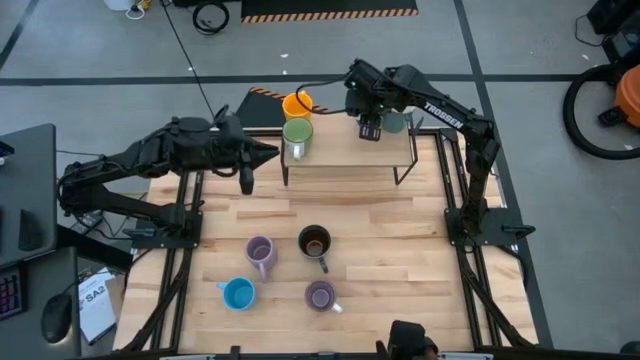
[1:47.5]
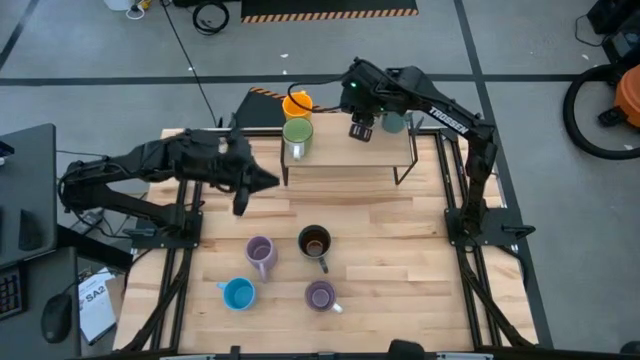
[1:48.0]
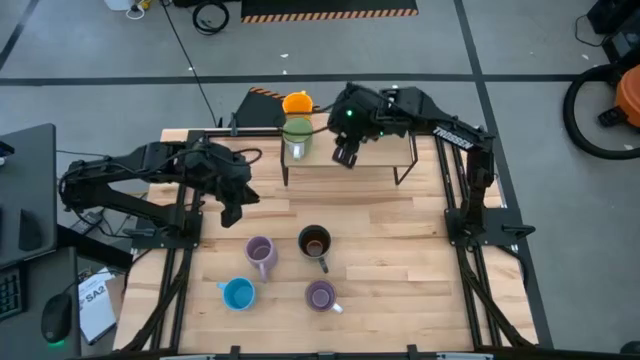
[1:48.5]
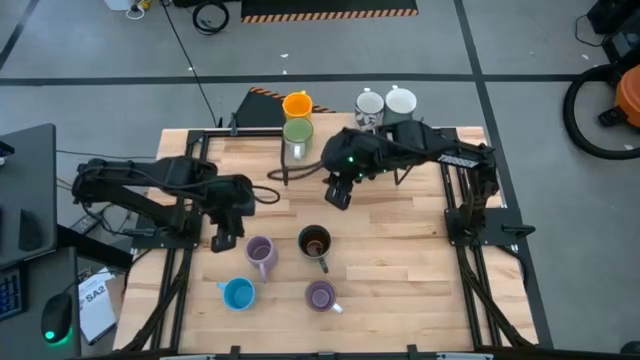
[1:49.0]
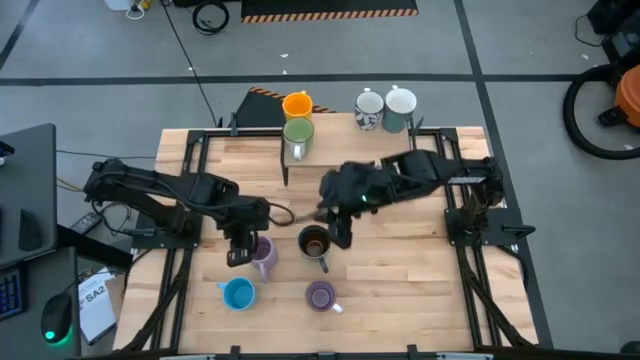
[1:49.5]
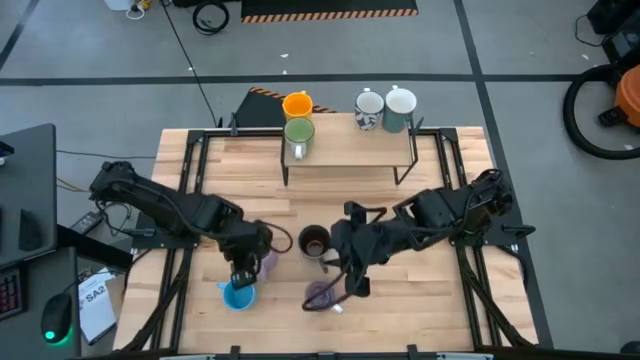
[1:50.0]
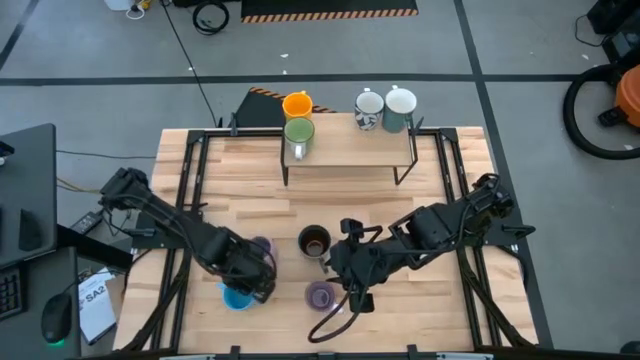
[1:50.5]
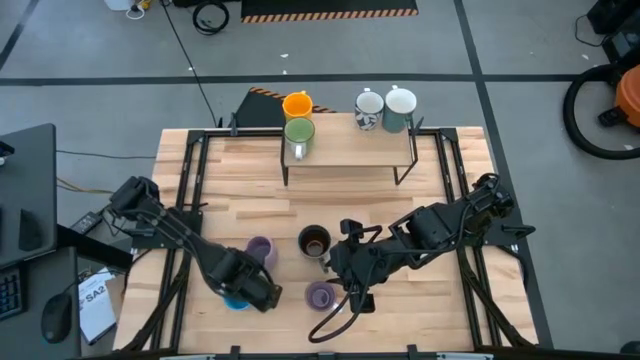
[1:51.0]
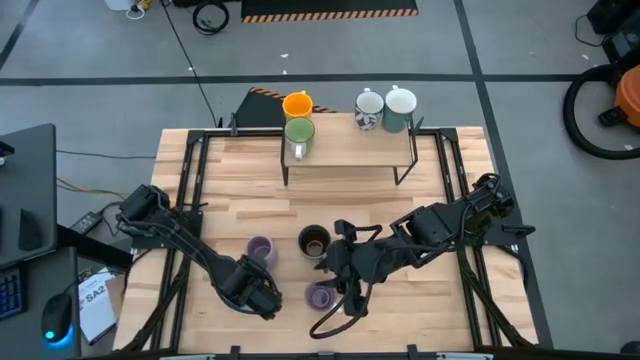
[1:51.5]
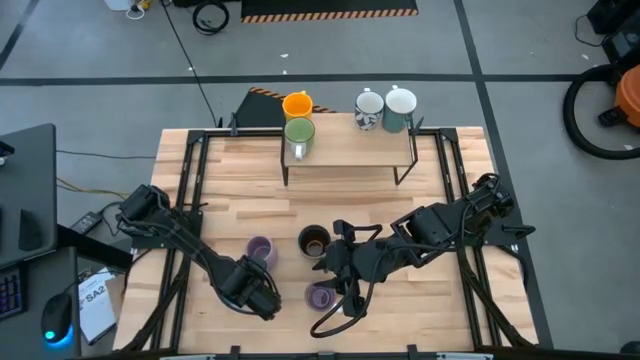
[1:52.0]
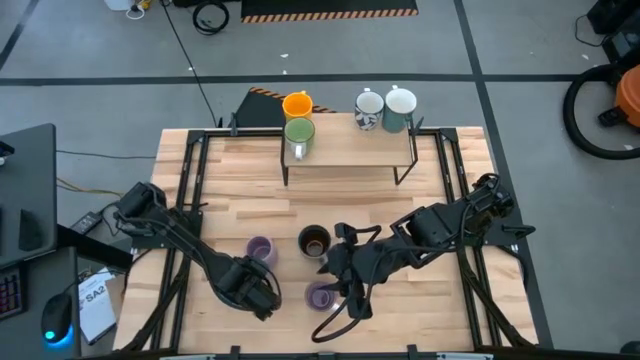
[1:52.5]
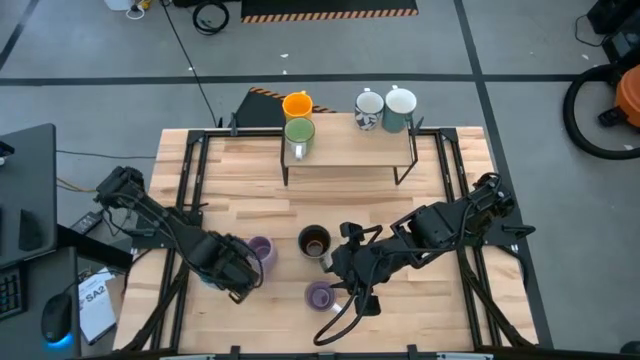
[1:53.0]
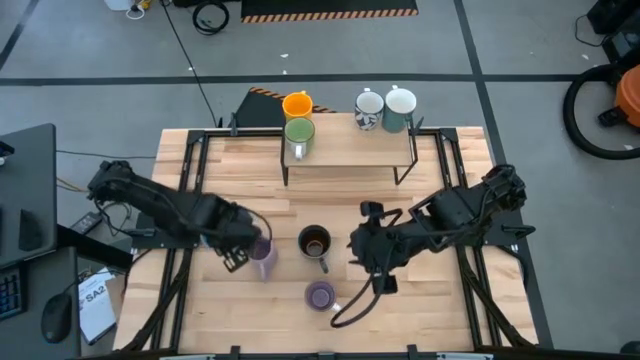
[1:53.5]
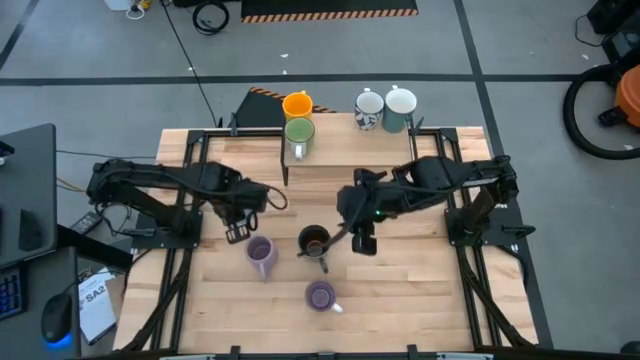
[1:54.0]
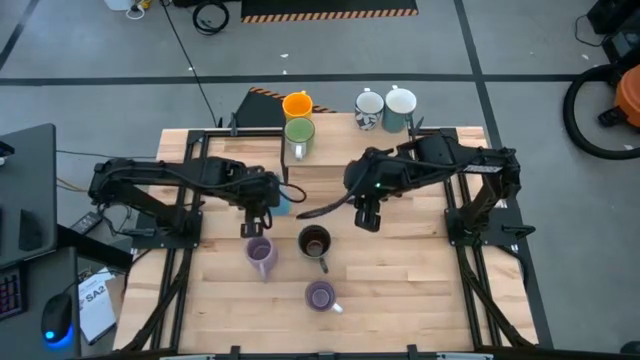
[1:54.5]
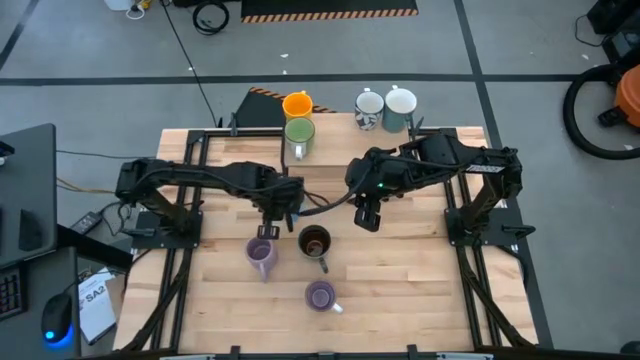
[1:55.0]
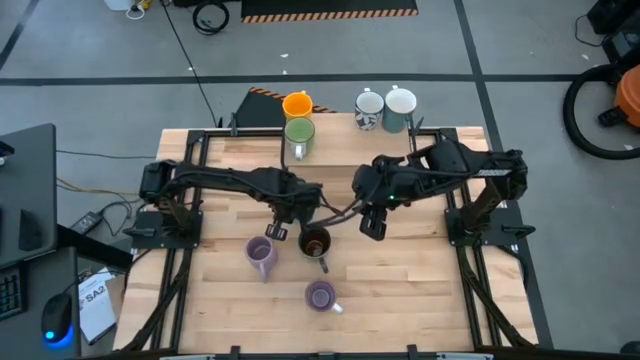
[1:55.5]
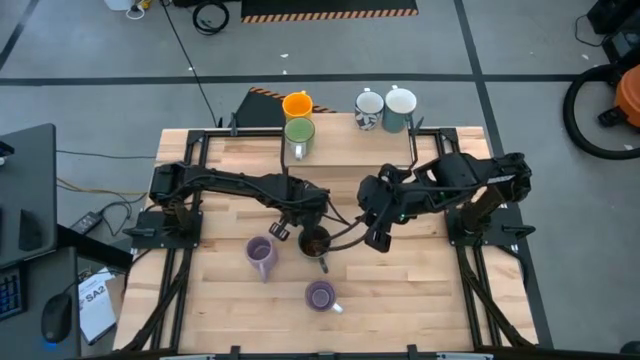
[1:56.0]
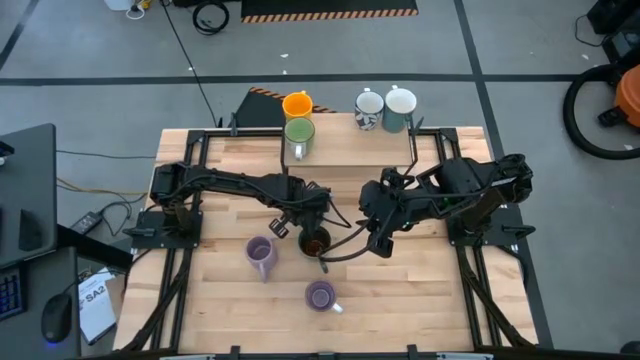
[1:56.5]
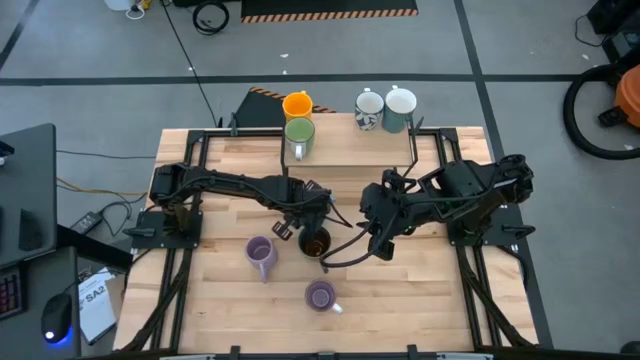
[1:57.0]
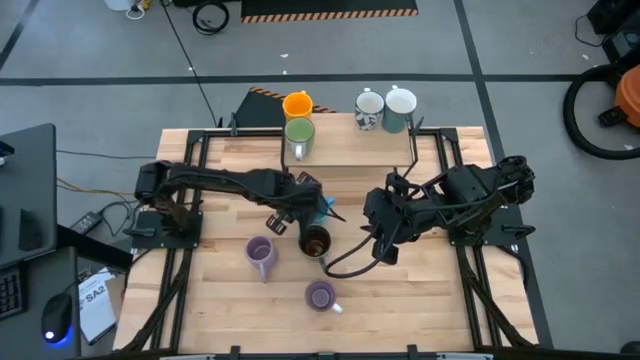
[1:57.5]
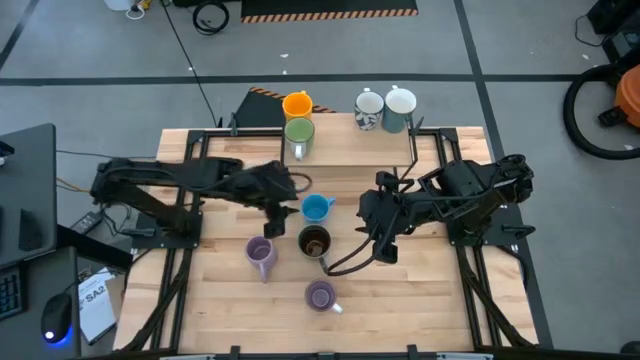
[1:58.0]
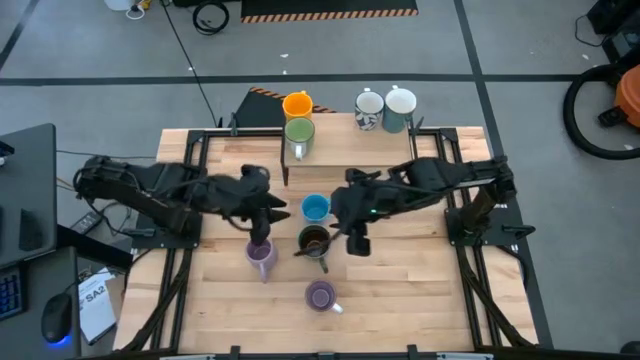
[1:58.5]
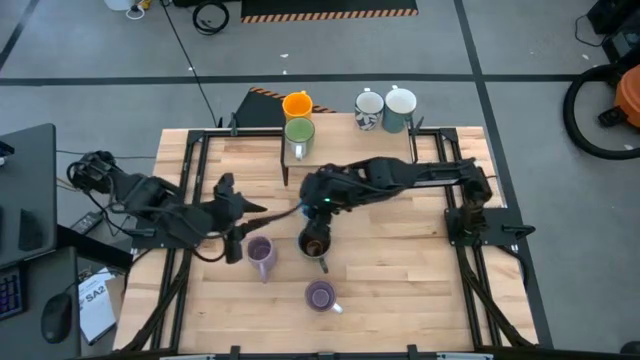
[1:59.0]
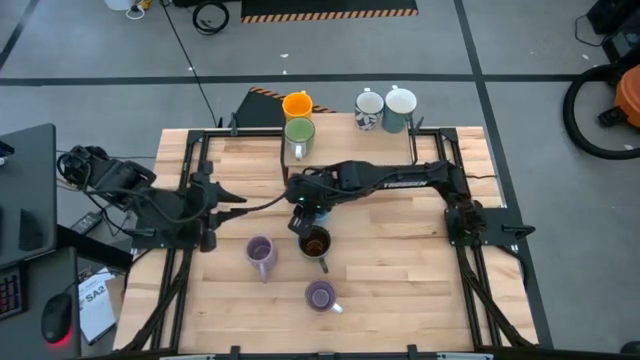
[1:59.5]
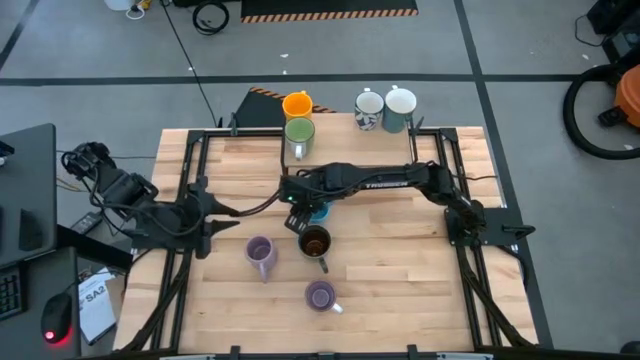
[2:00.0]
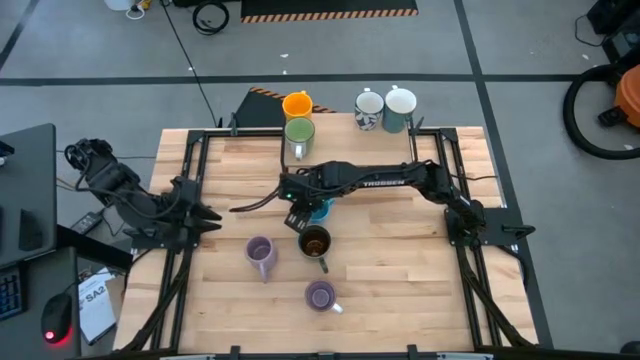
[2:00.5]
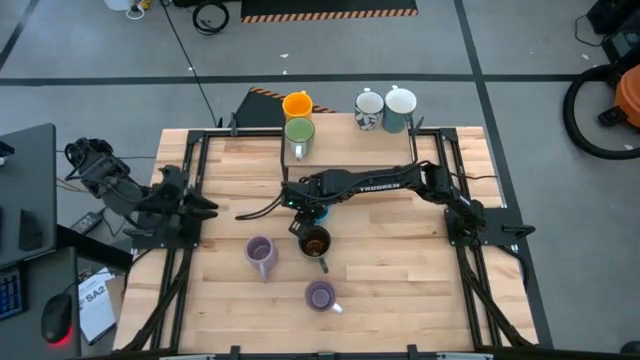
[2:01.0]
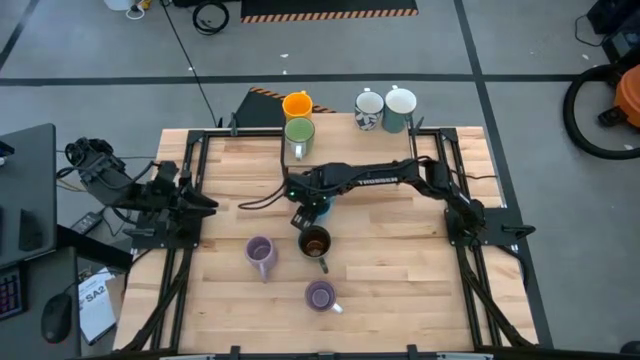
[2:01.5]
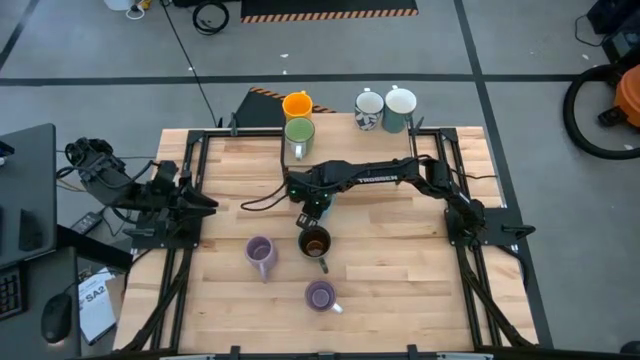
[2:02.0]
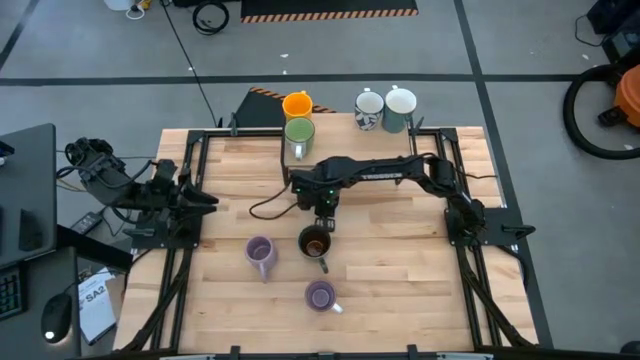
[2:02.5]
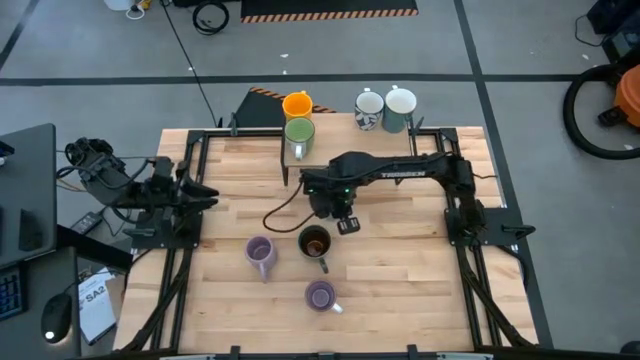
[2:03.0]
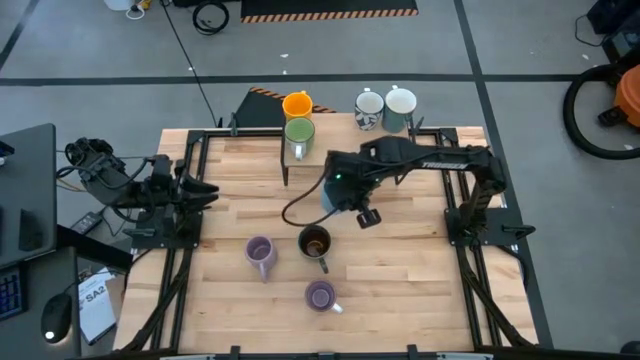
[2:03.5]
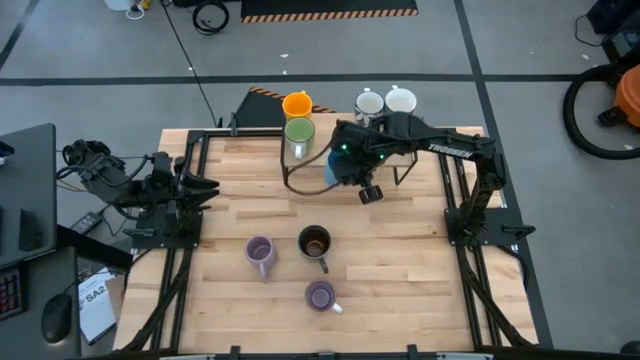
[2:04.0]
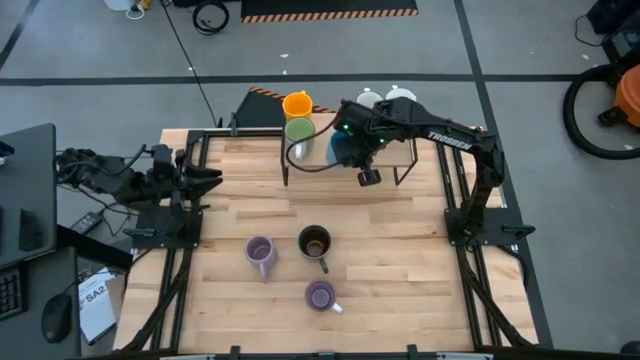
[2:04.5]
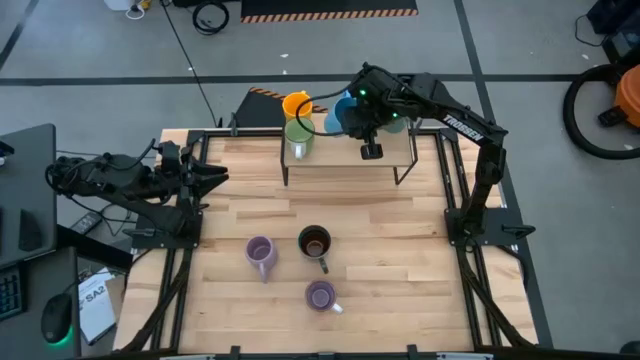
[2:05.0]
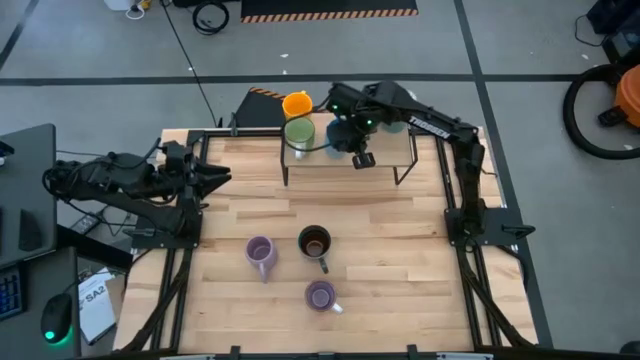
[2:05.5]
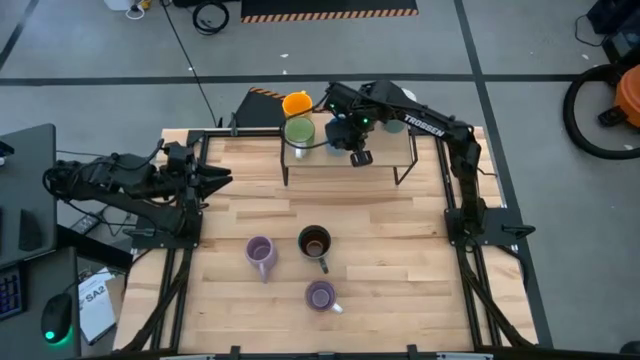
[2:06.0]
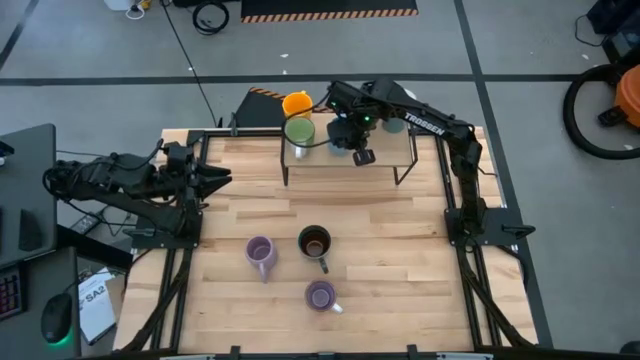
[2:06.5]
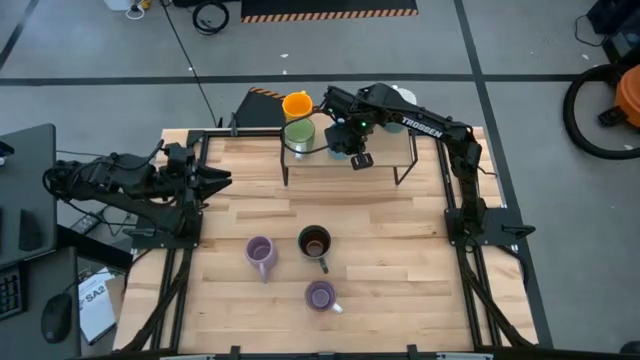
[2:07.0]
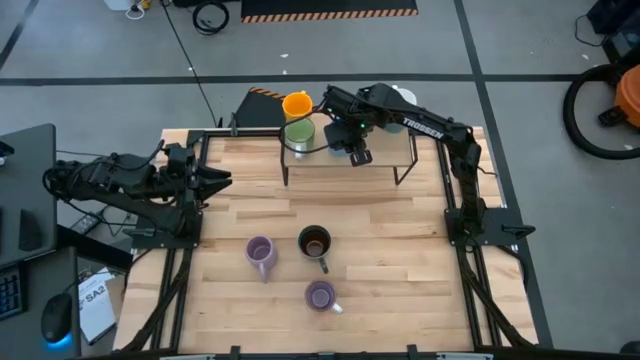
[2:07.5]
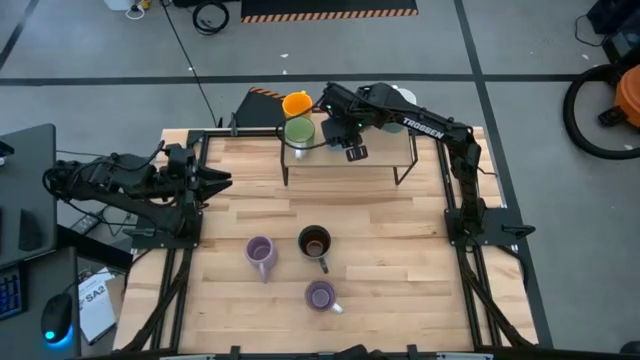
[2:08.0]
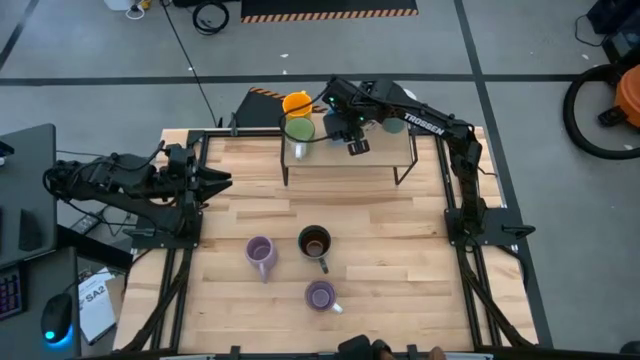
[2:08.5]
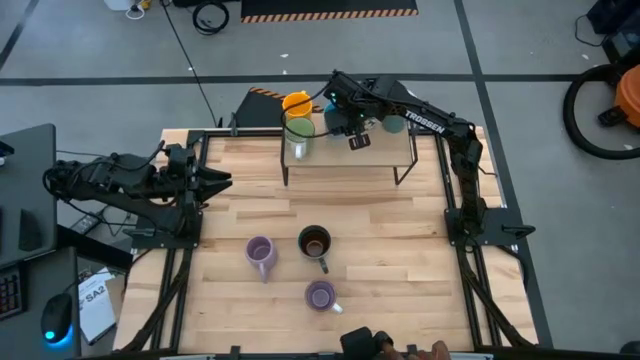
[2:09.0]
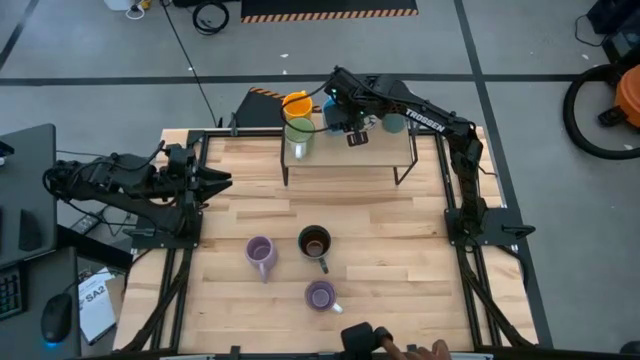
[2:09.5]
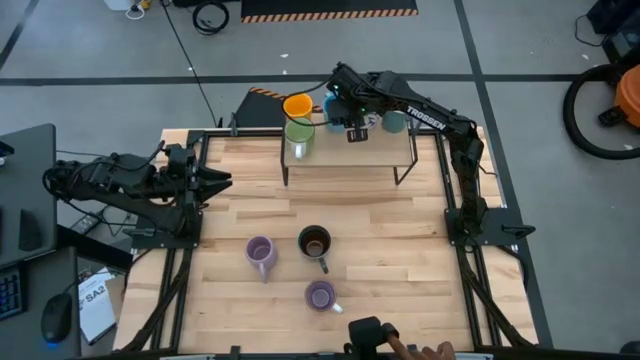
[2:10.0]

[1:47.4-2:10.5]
Task: Place coffee mugs
Put the light blue mug on the shelf
